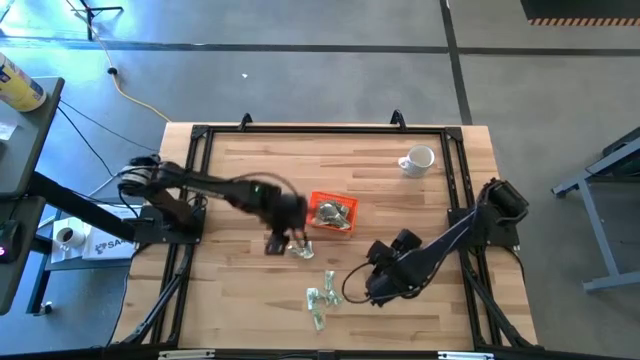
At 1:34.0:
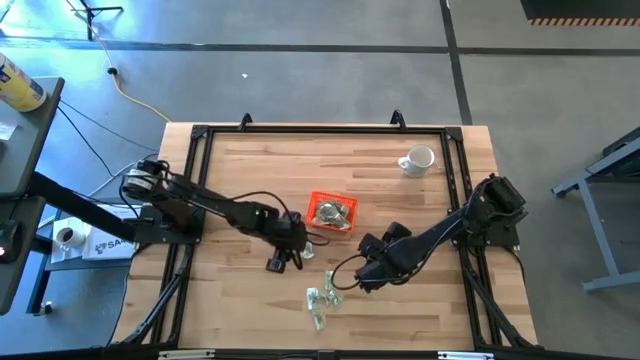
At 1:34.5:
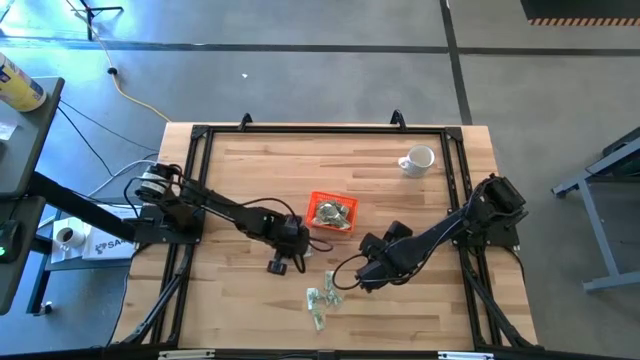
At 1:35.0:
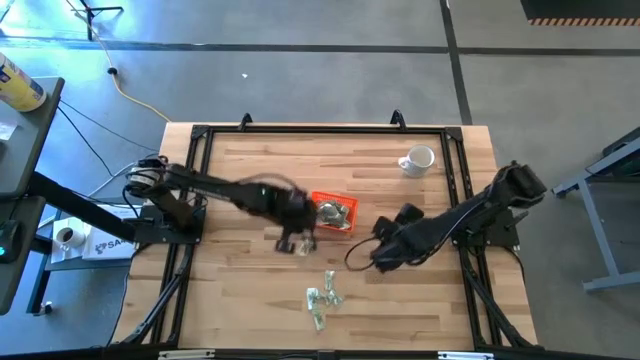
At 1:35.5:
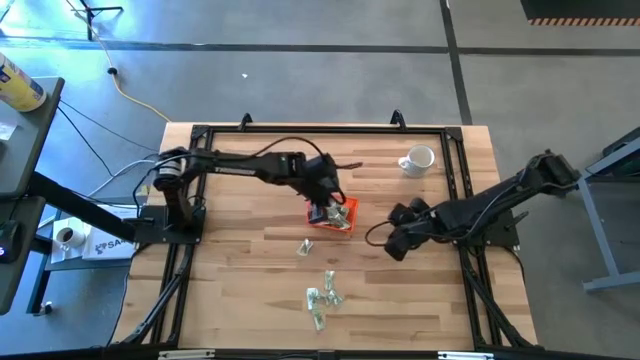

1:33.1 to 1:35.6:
Task: Pick and place Stevia / Truvia into bins
Put the stevia packet into the orange bin

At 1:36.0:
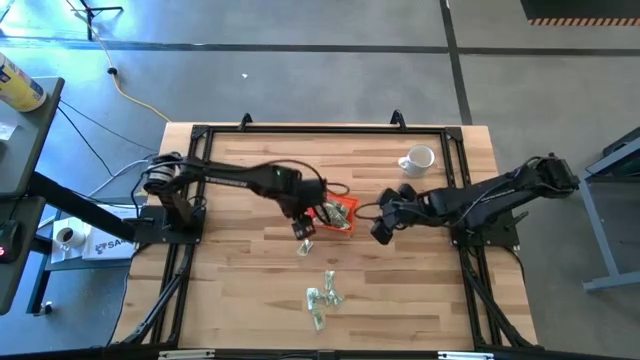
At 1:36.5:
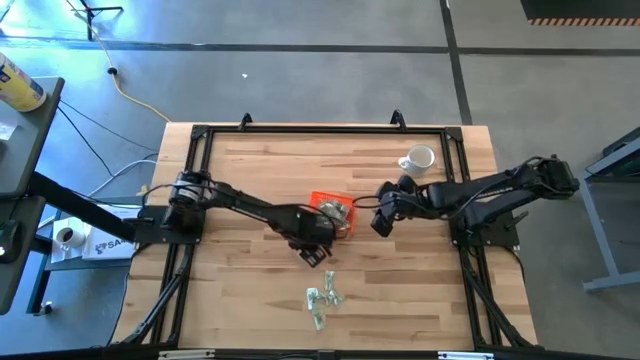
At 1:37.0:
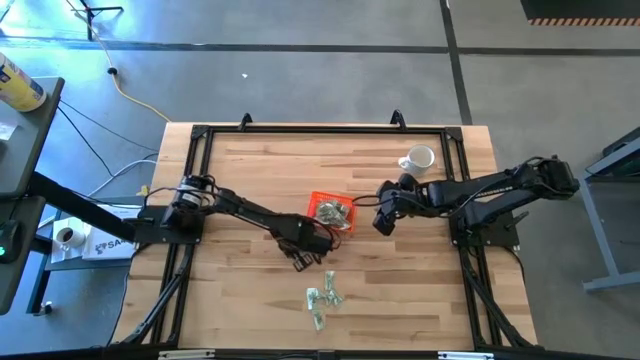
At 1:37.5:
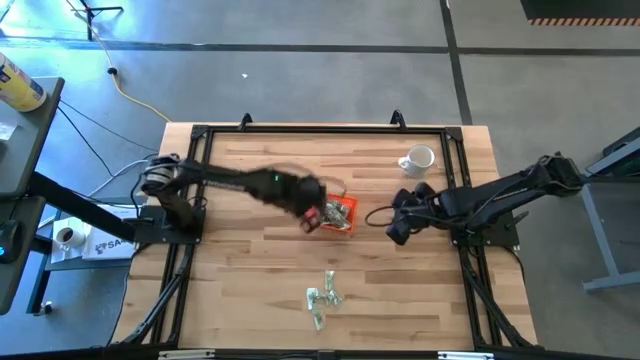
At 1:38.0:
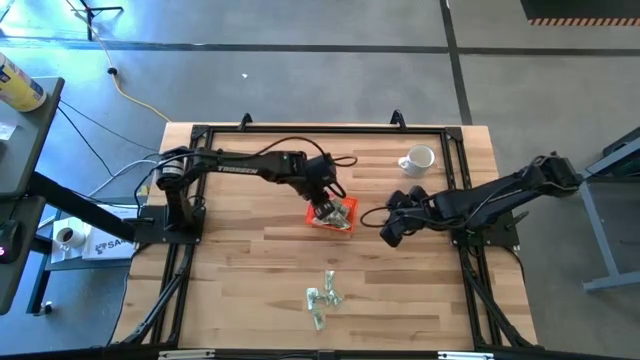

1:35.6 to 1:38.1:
Put the stevia packet into the orange bin

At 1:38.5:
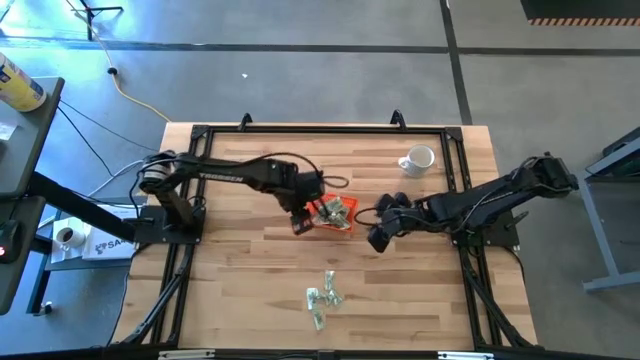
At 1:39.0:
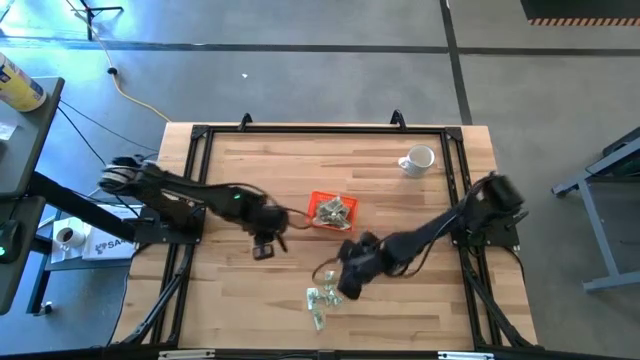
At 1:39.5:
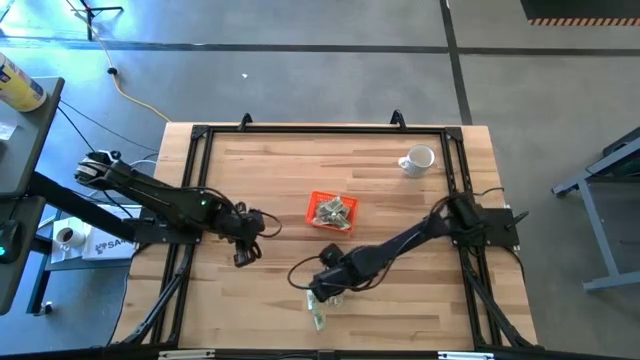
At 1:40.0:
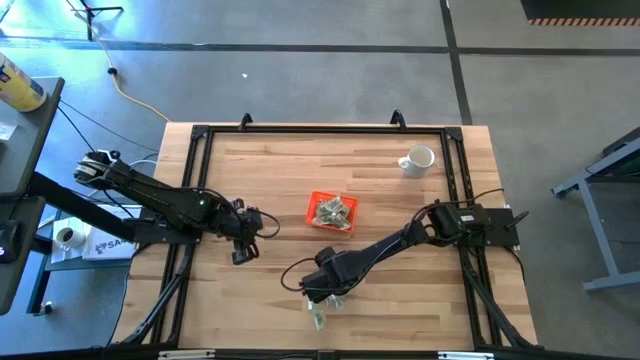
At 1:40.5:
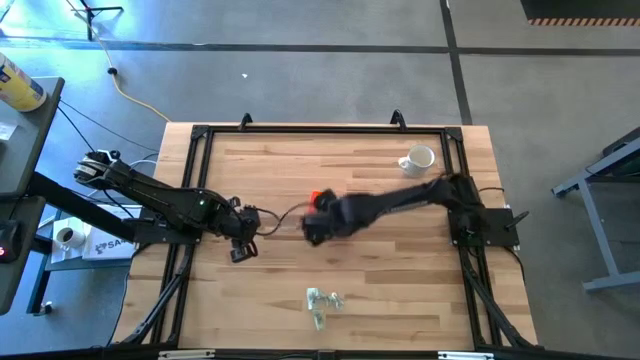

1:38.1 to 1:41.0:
Put the stevia packet into the orange bin

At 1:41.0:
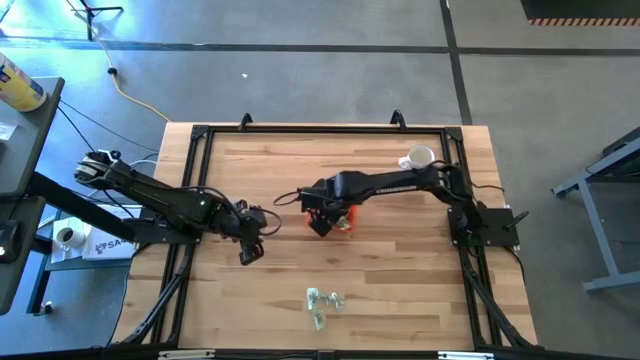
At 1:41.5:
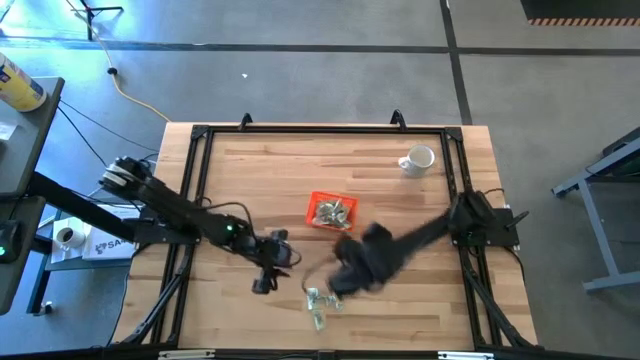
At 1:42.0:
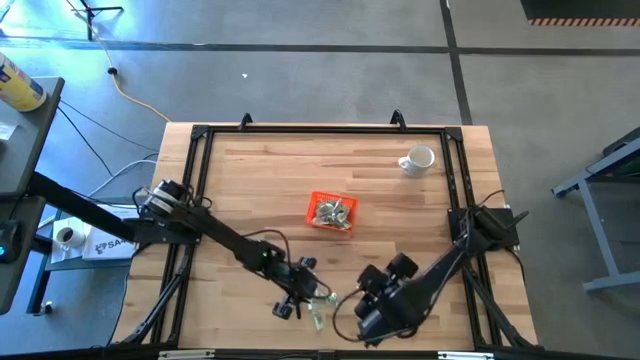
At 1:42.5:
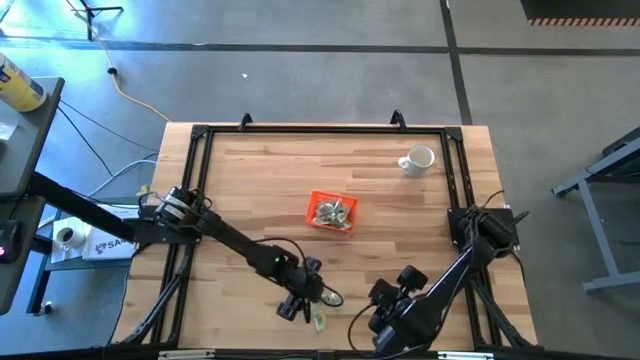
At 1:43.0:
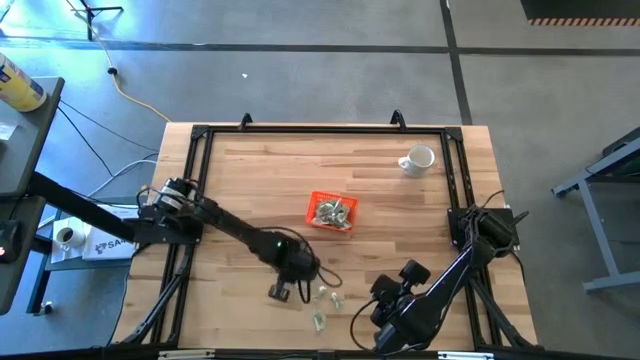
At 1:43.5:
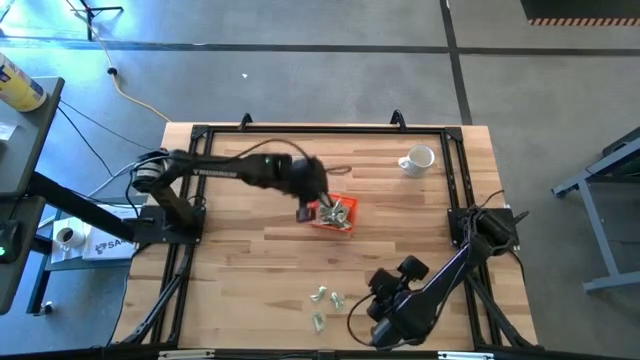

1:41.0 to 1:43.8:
Put the stevia packet into the orange bin

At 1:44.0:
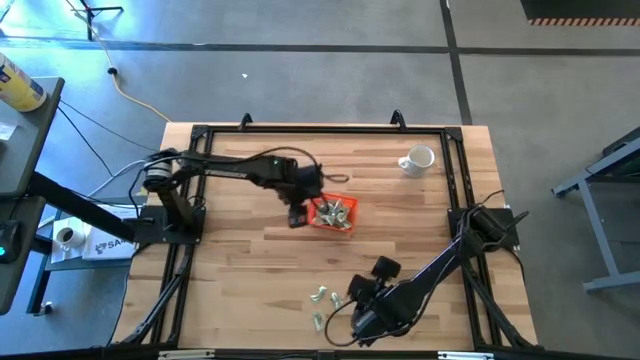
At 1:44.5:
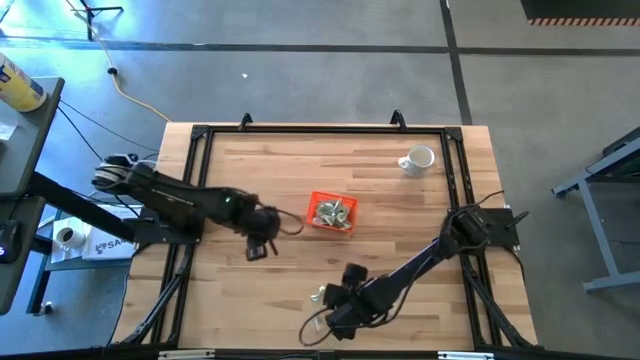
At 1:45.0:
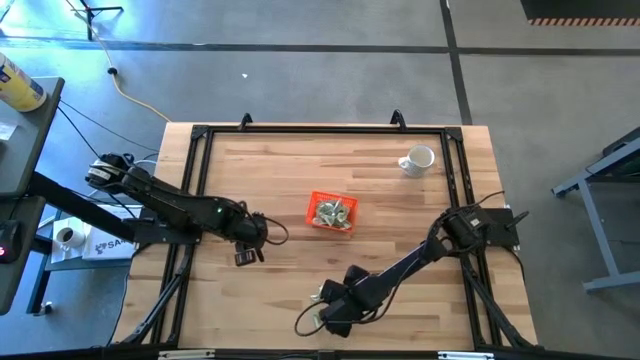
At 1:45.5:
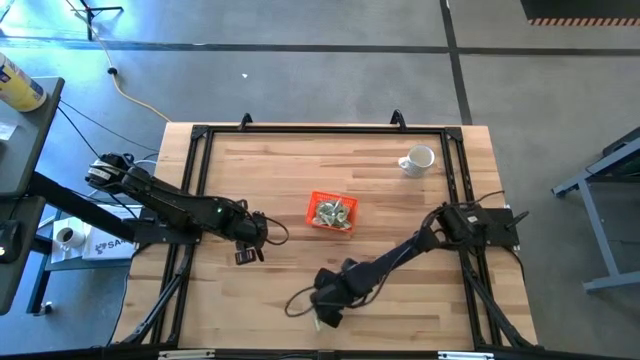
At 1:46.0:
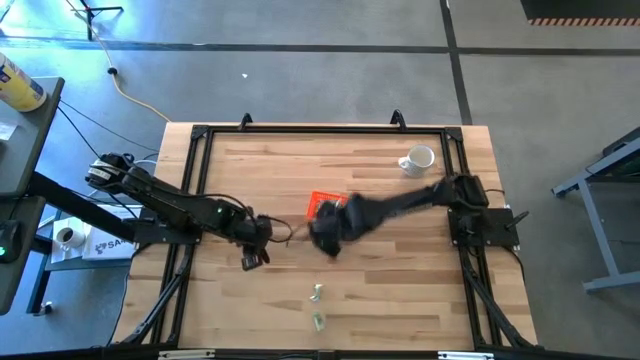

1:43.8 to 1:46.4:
Put the stevia packet into the orange bin

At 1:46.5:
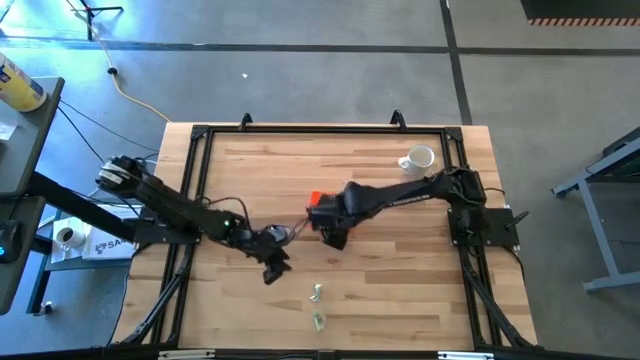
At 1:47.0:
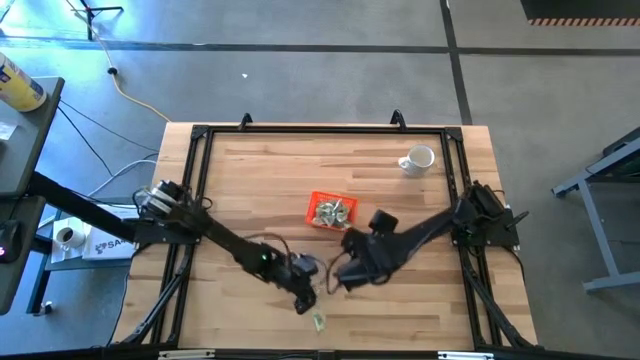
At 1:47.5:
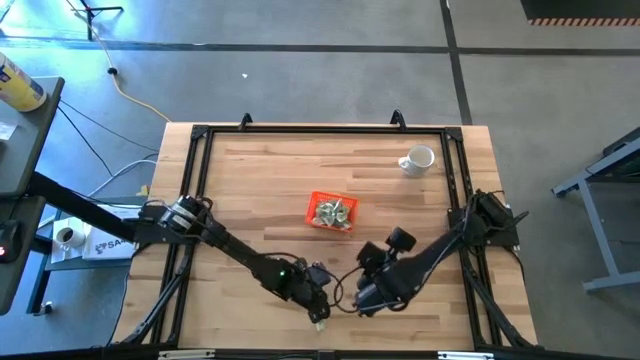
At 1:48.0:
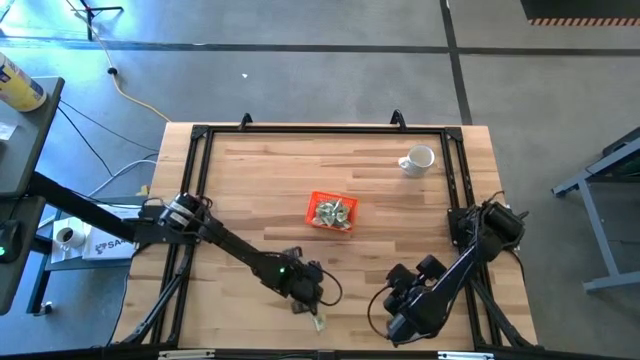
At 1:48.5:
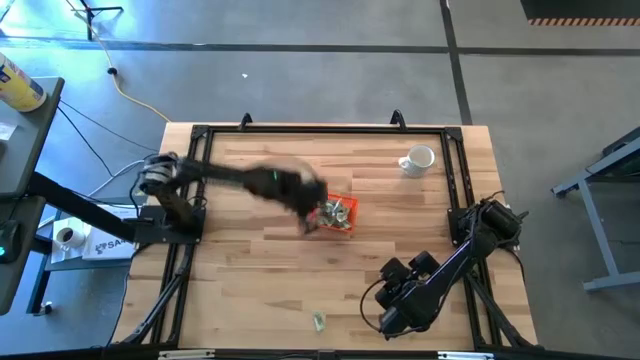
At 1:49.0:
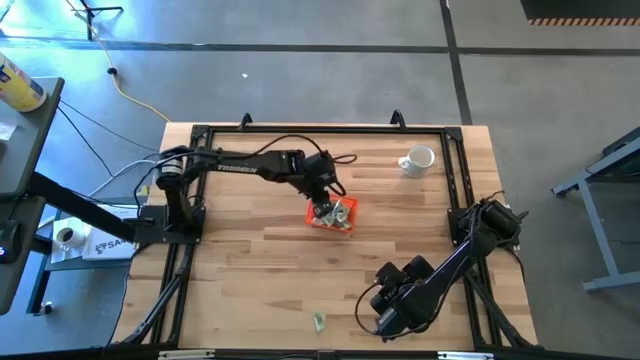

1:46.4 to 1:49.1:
Put the stevia packet into the orange bin

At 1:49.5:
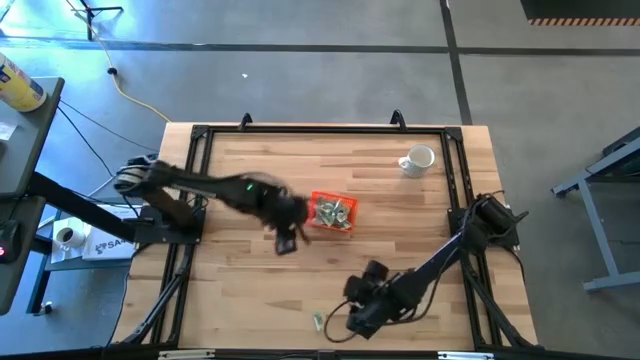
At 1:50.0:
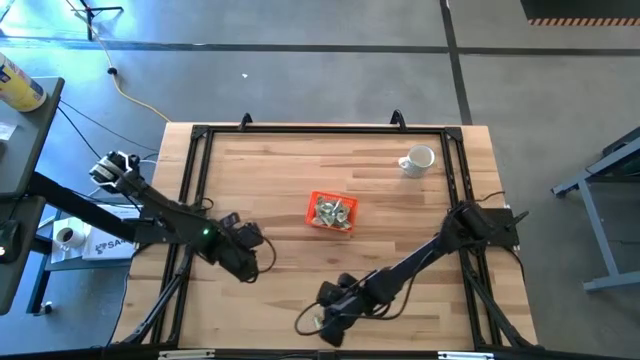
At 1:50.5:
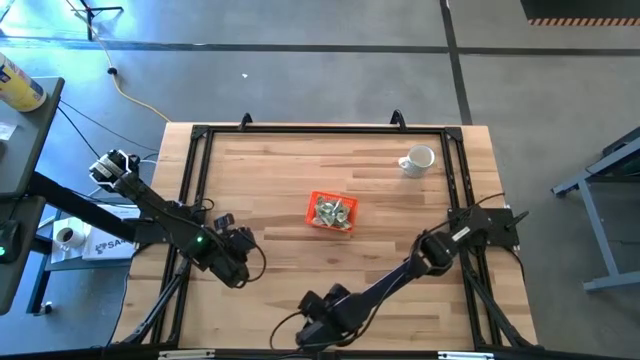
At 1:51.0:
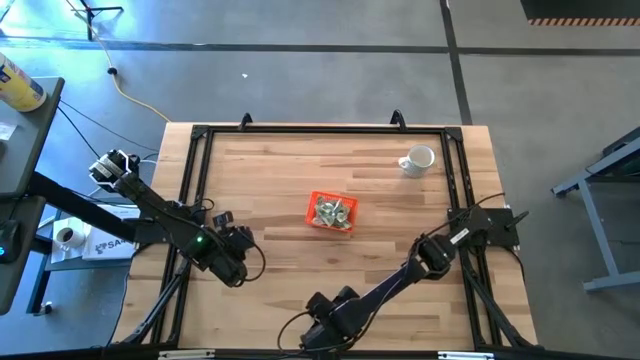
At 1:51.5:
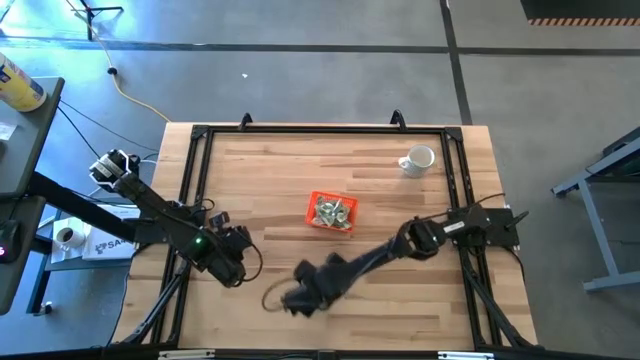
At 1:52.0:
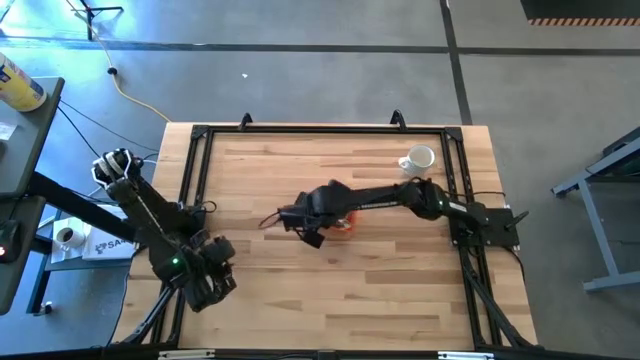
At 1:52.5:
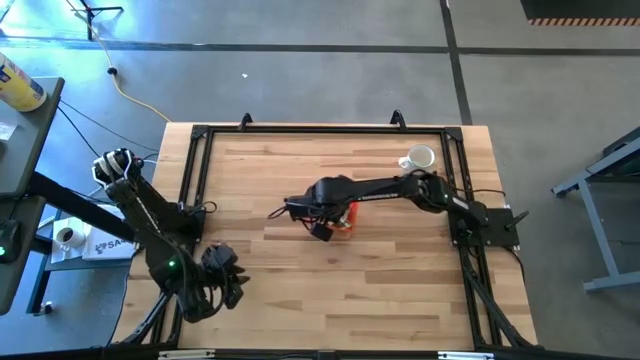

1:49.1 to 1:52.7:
Put the stevia packet into the orange bin

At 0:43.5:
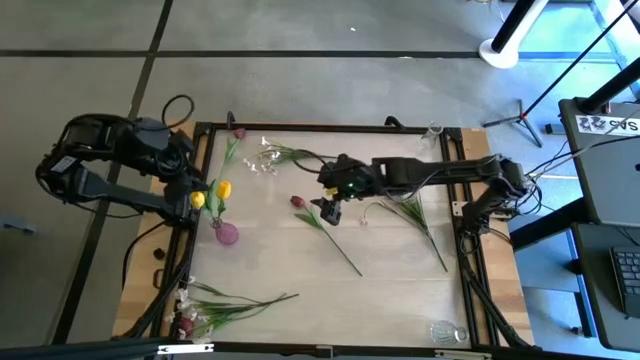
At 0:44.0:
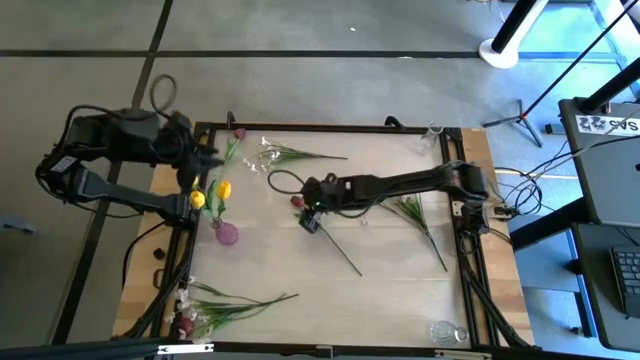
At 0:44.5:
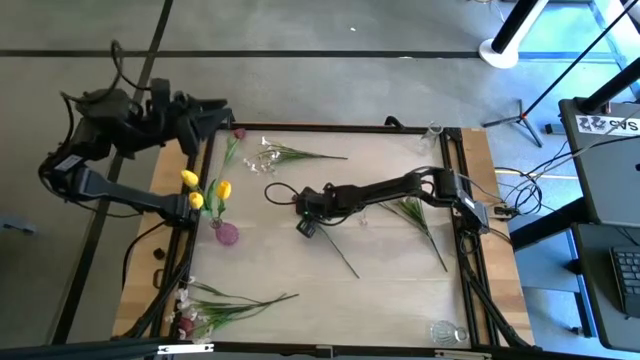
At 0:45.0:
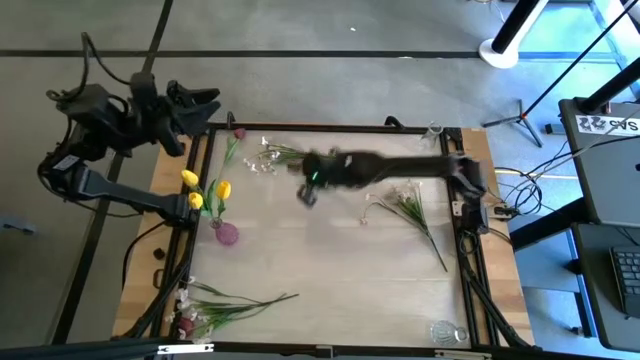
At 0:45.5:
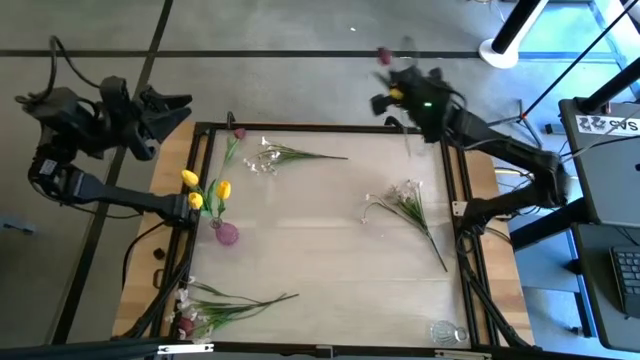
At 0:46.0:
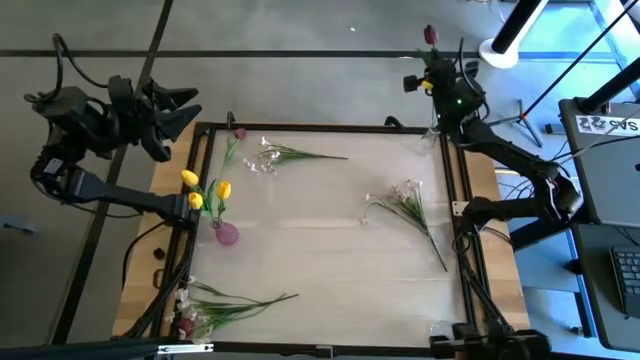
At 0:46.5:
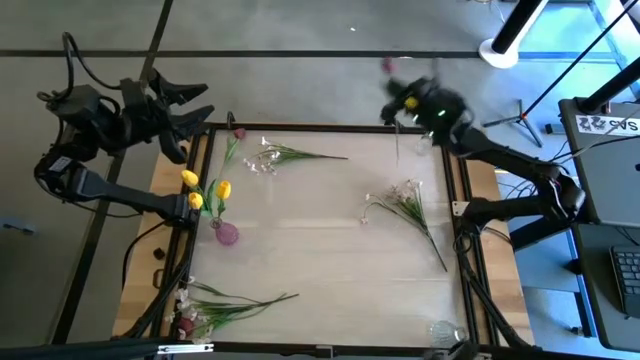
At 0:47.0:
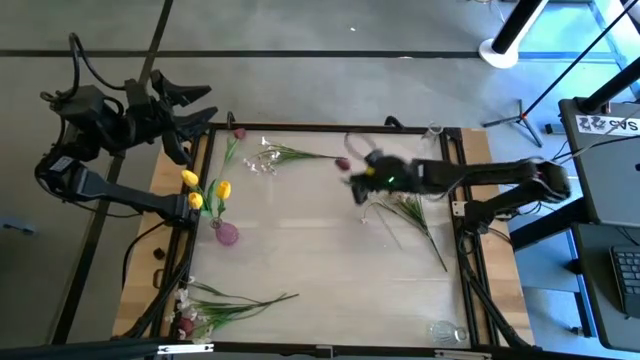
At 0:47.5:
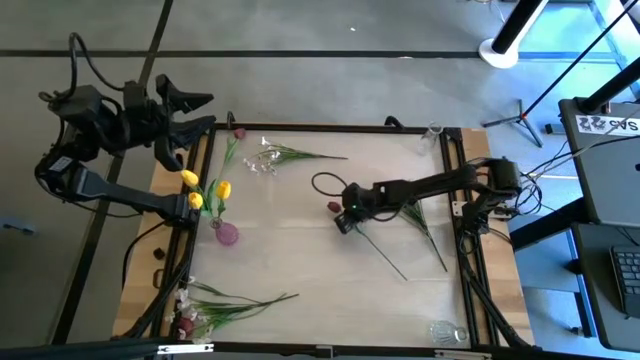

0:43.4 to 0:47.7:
Task: Sort flowers into vase by color
Put the bottom red tulip into the bottom transparent flower vase
